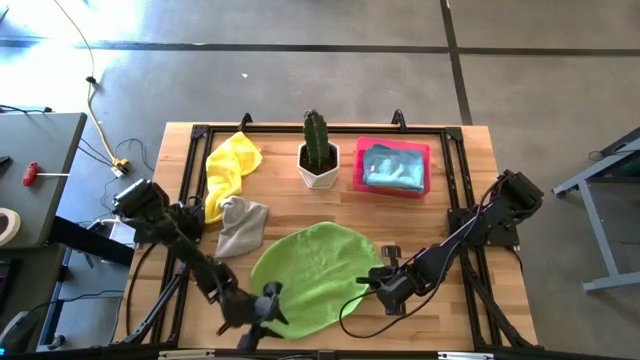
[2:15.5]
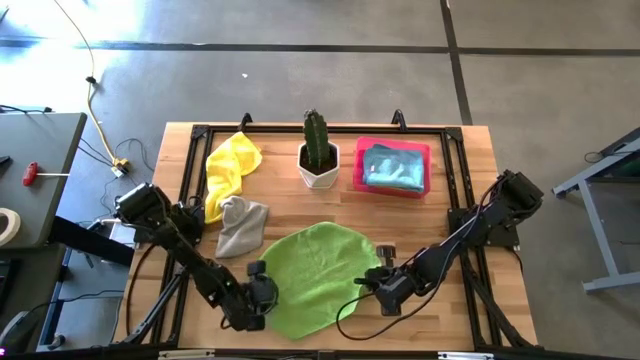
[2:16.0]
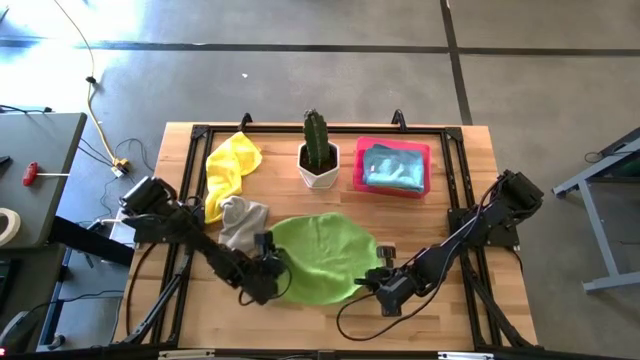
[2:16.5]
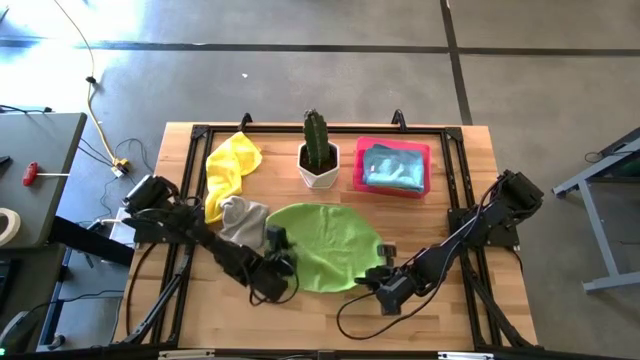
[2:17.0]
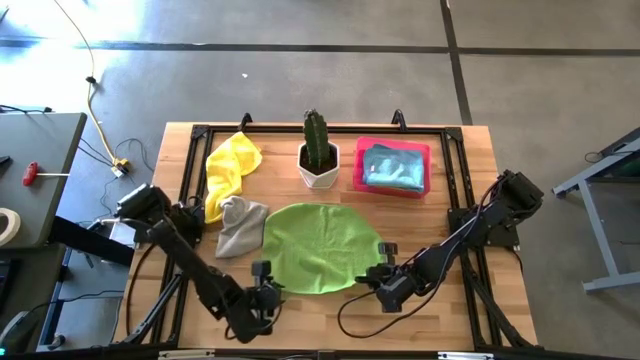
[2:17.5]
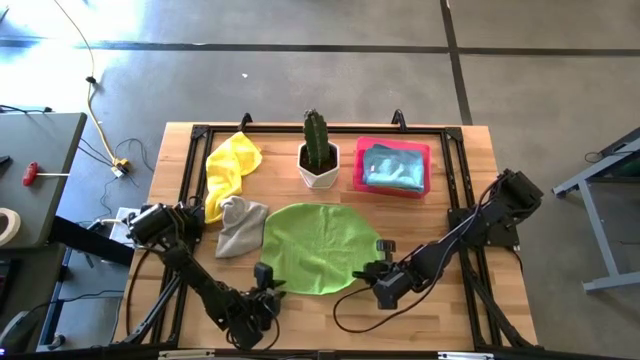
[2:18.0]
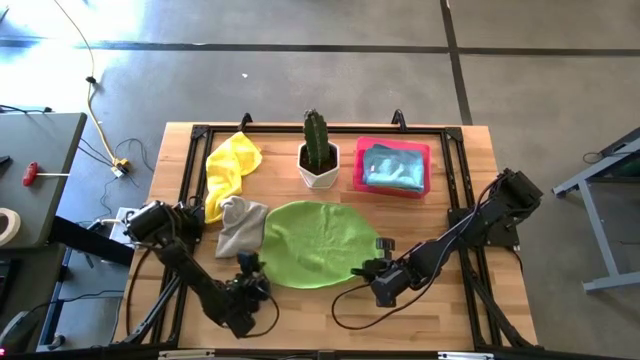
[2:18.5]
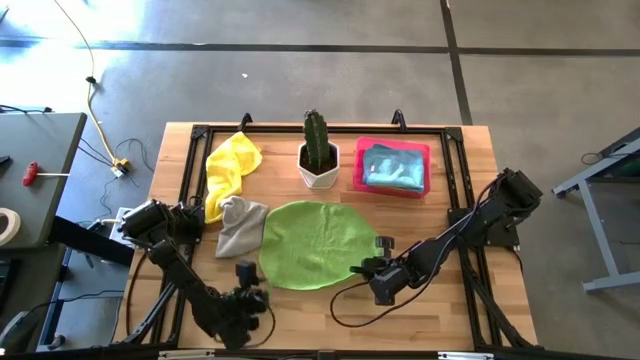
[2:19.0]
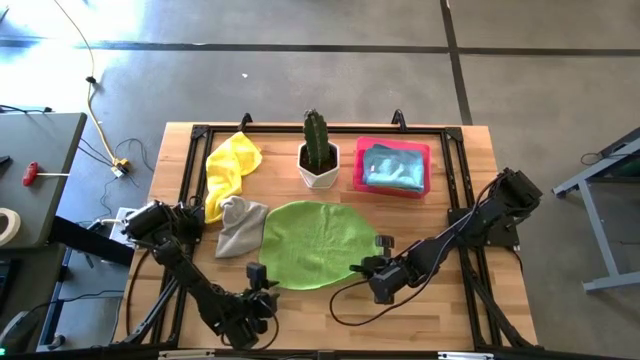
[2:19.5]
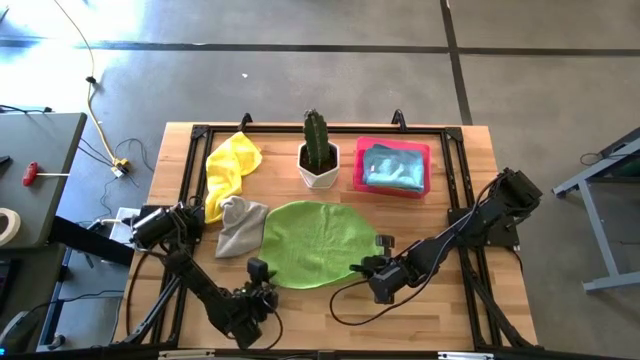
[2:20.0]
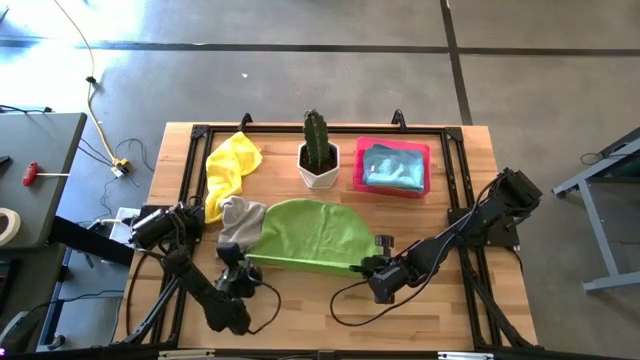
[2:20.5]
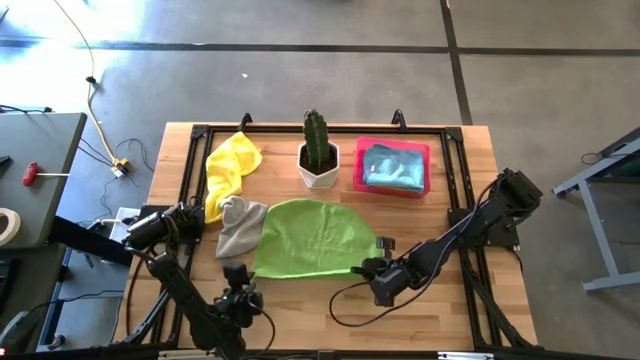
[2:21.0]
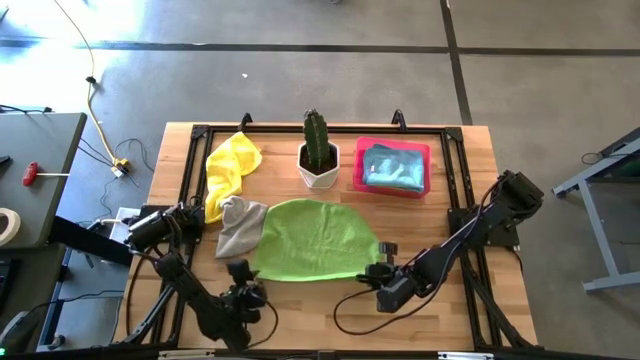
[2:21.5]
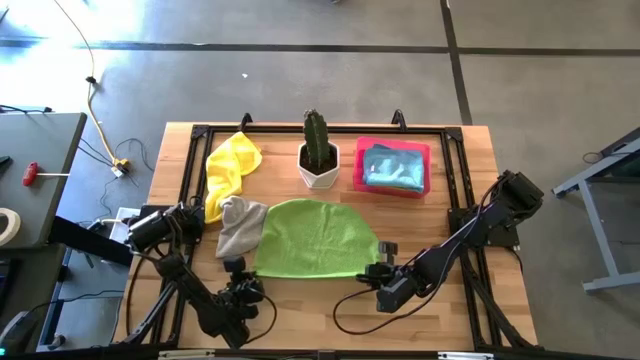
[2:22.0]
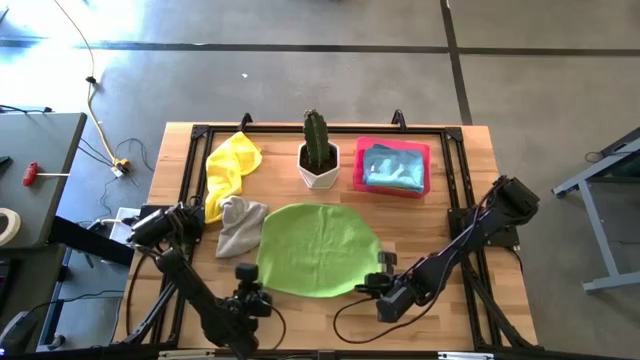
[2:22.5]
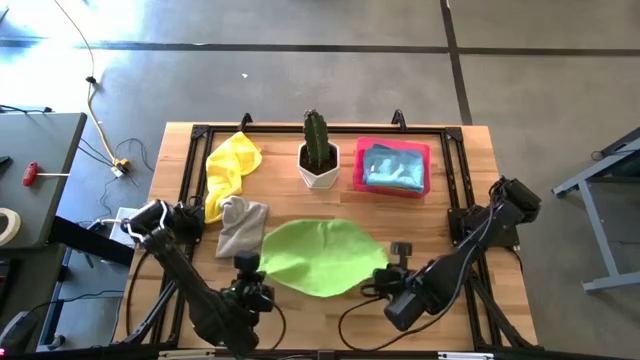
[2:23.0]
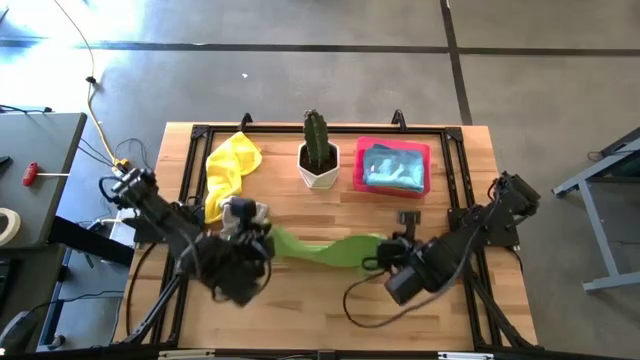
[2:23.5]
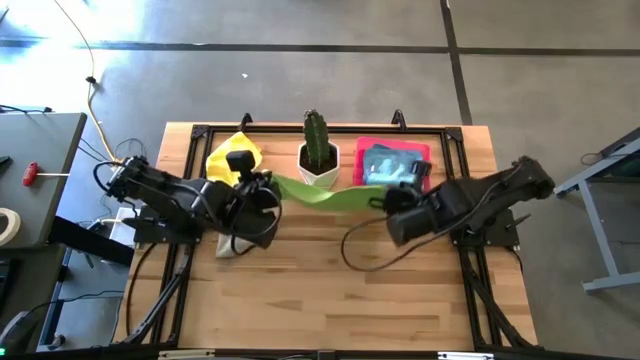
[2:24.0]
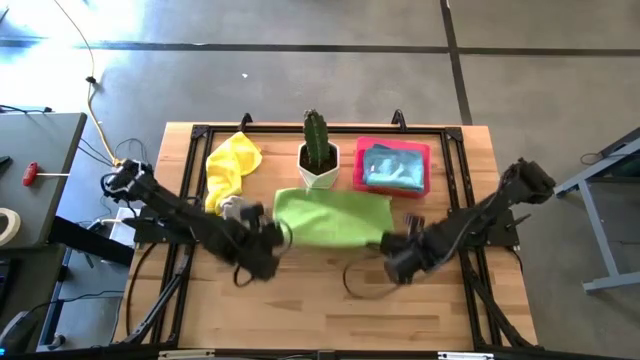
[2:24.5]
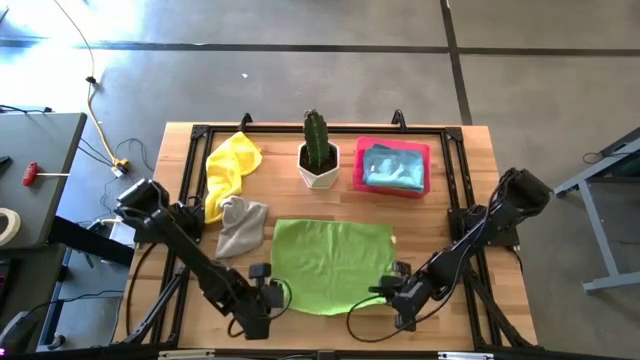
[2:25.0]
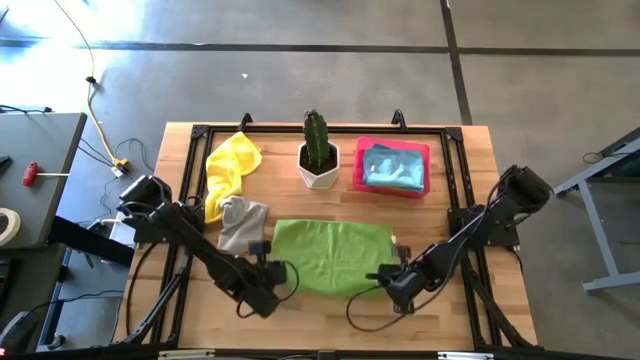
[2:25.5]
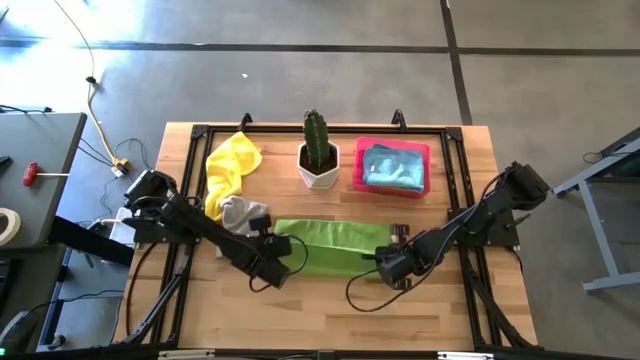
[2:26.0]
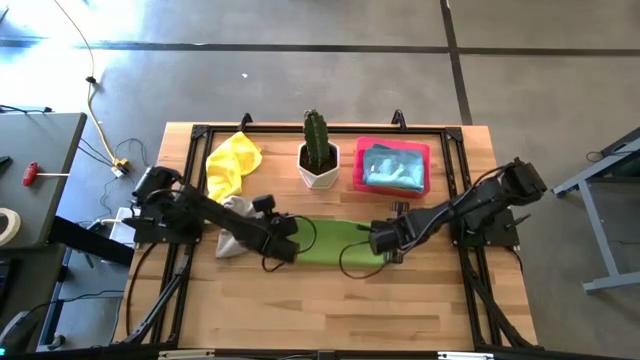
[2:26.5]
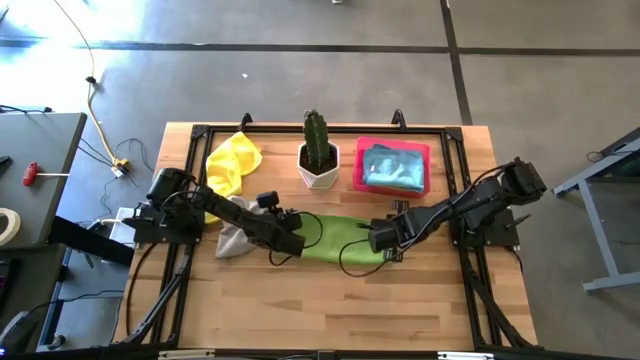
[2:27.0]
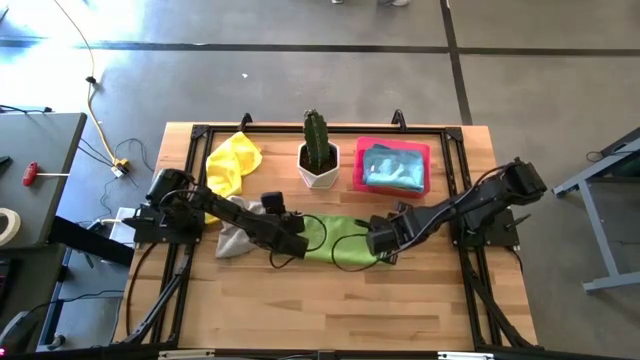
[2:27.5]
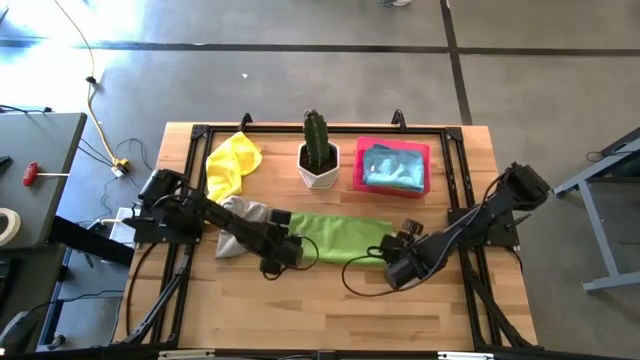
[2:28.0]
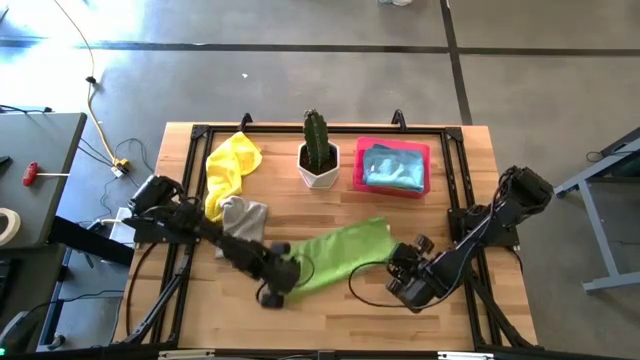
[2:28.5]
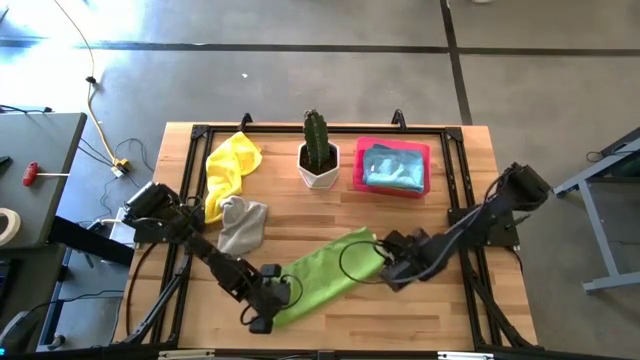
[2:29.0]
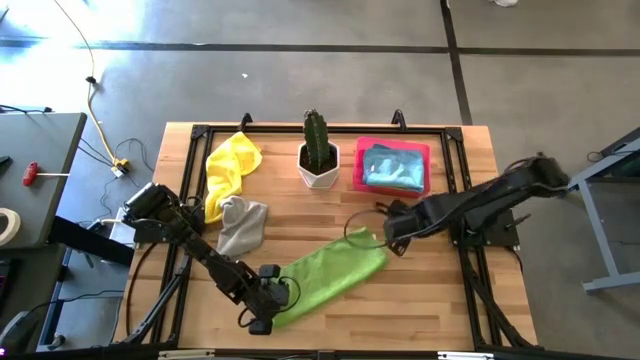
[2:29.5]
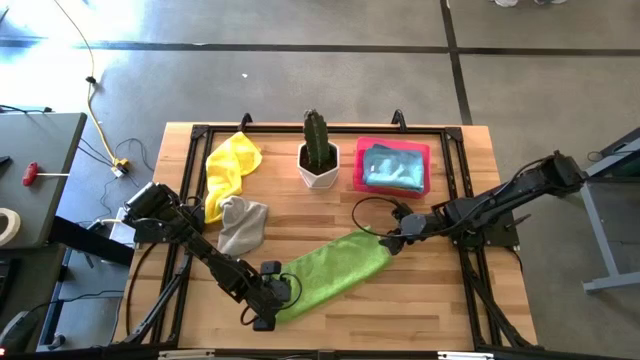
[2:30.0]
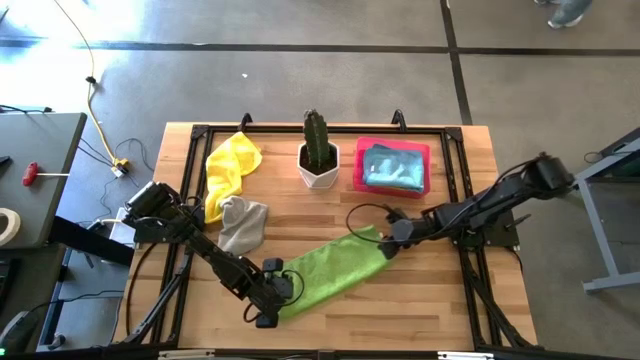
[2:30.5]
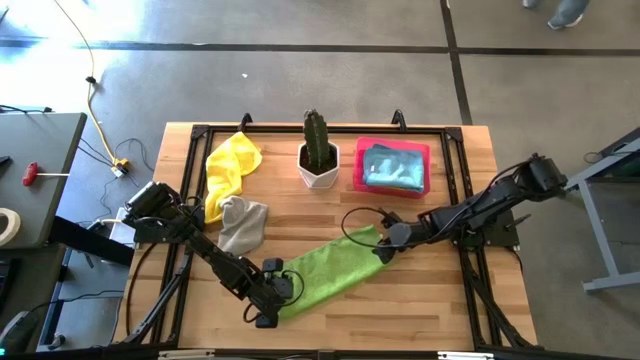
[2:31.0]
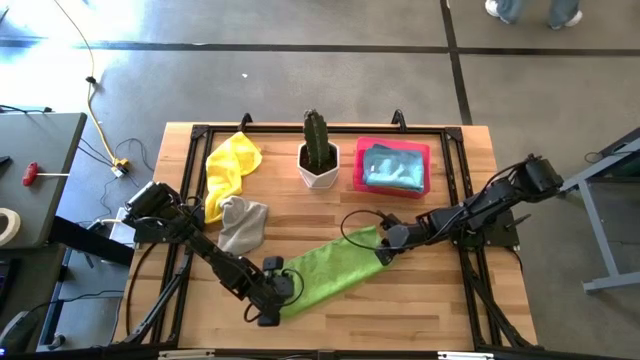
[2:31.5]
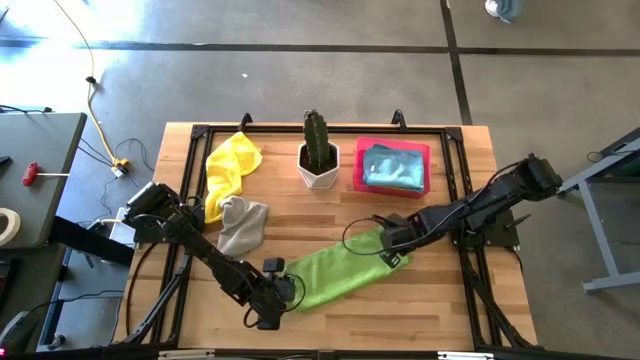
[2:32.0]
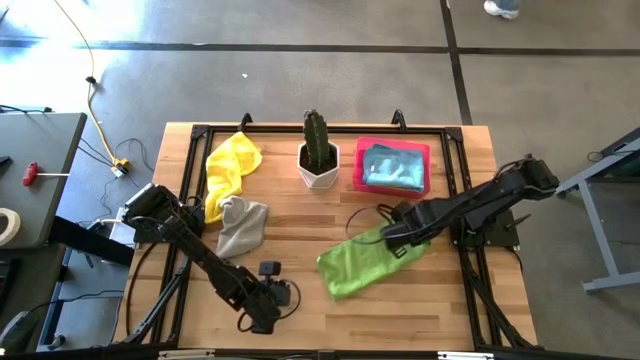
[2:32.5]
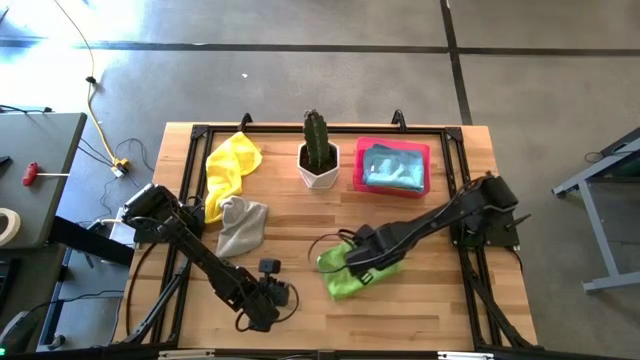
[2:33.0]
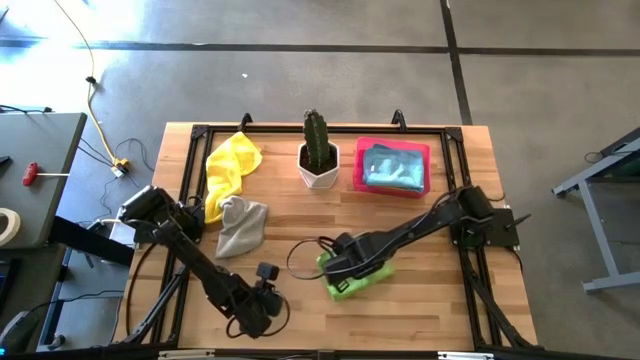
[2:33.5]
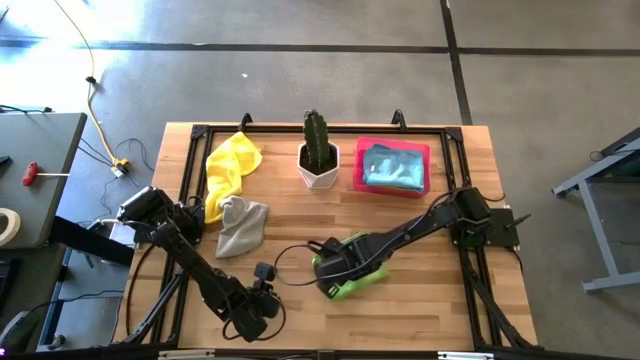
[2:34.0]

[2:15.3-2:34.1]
Task: Fold microfiber towels
Fold the yellow green towel

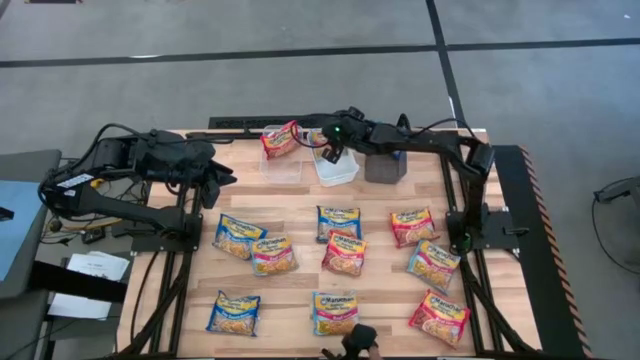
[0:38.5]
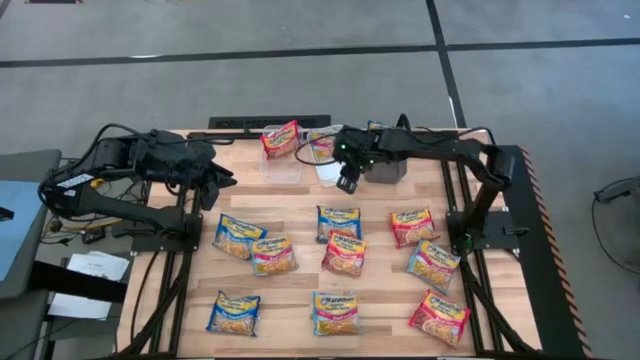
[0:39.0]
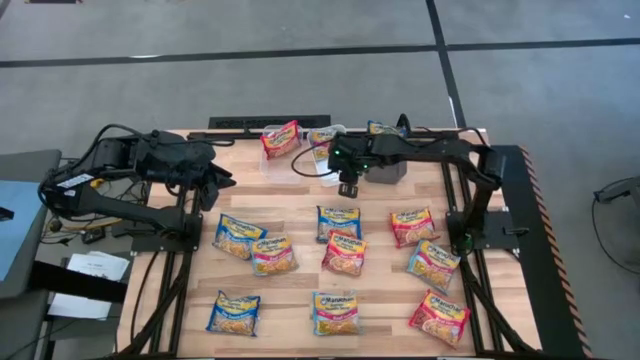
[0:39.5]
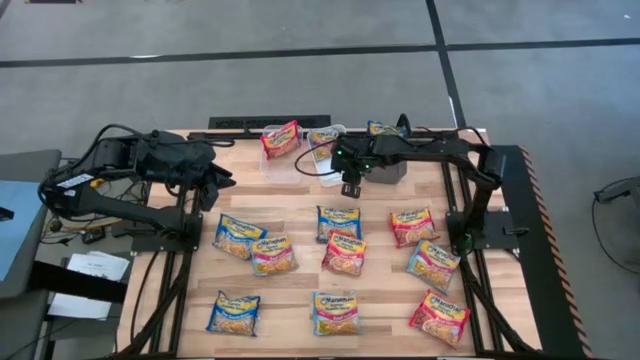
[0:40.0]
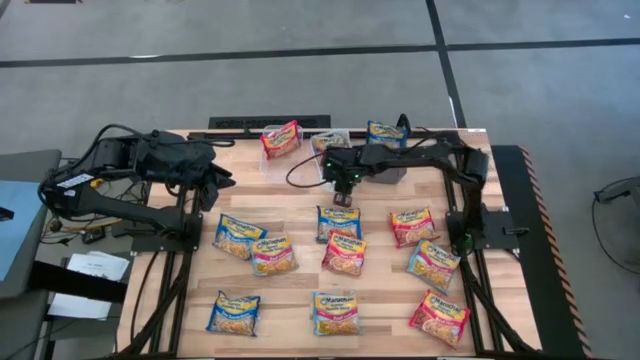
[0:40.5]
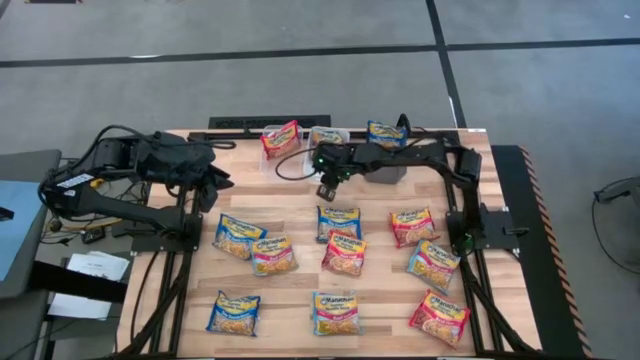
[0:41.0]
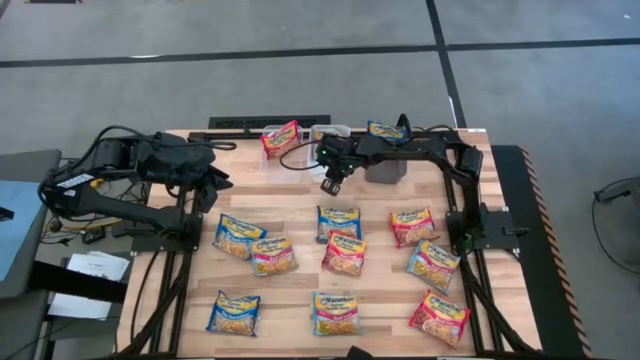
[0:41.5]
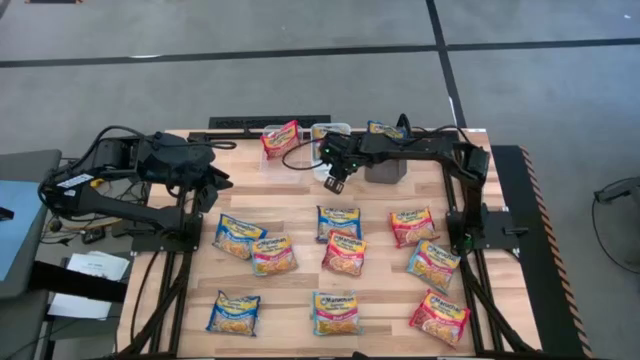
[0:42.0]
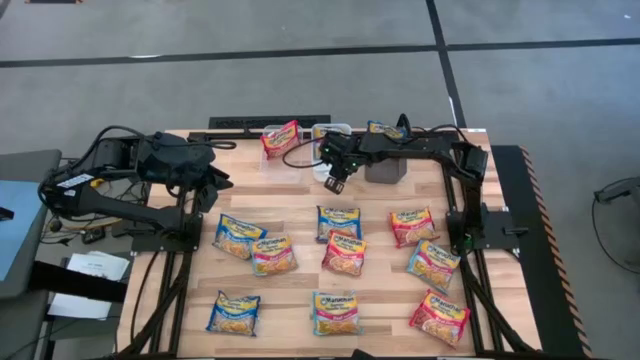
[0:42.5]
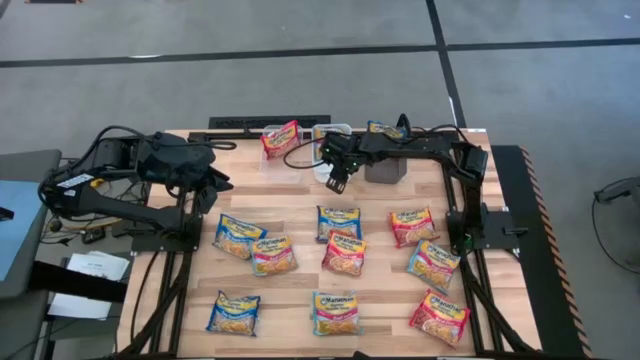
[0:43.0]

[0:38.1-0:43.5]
Task: Sort Maruchan noodles
Adjust the white bin
